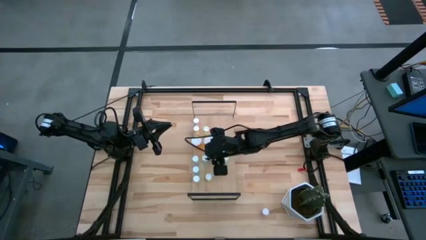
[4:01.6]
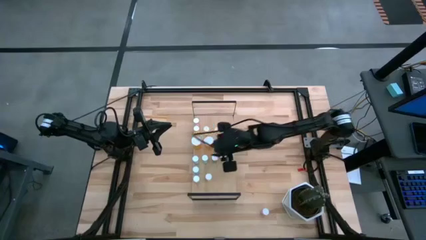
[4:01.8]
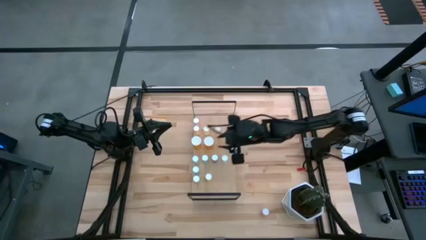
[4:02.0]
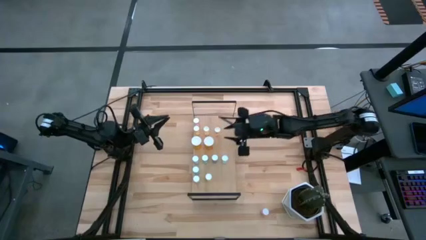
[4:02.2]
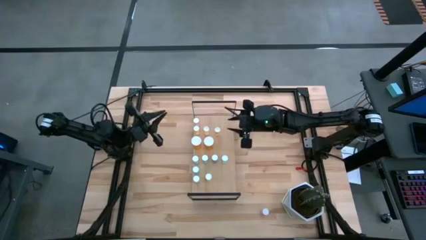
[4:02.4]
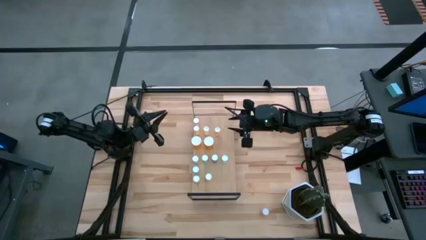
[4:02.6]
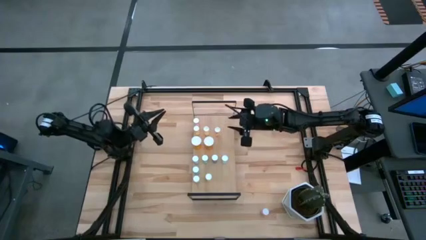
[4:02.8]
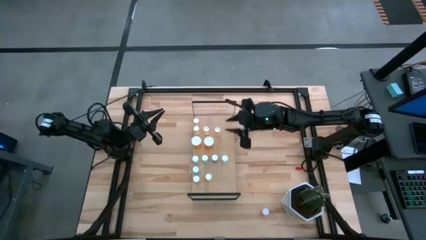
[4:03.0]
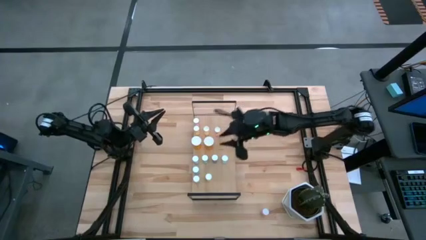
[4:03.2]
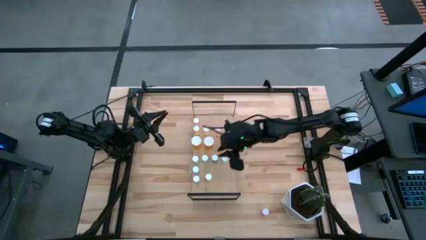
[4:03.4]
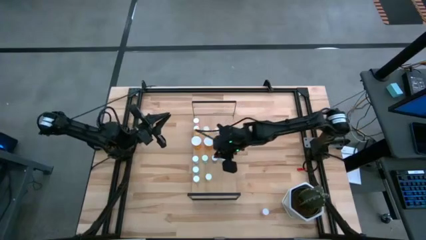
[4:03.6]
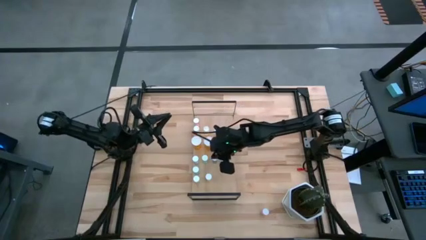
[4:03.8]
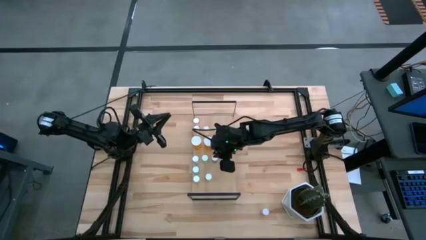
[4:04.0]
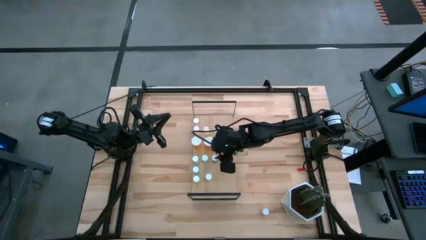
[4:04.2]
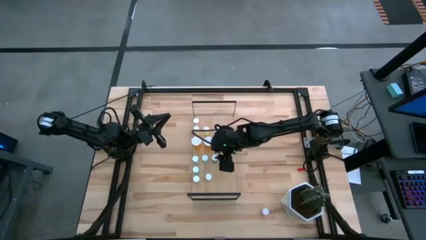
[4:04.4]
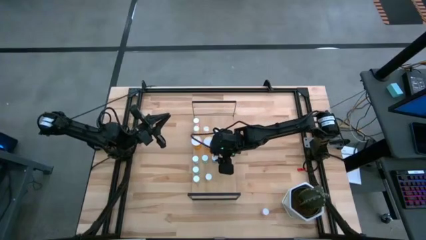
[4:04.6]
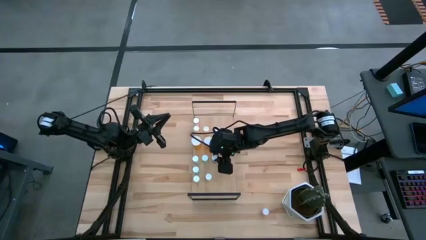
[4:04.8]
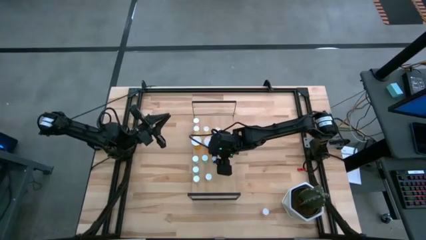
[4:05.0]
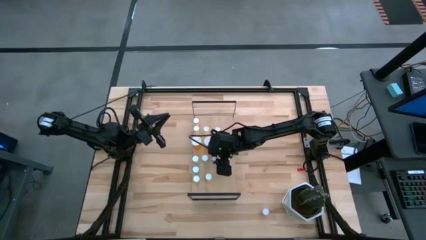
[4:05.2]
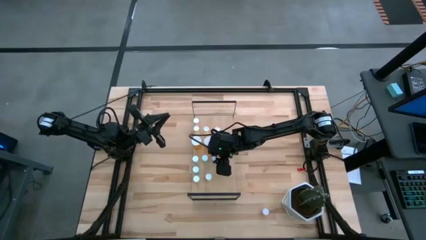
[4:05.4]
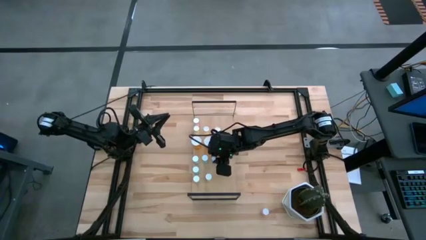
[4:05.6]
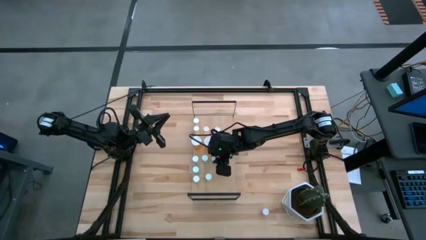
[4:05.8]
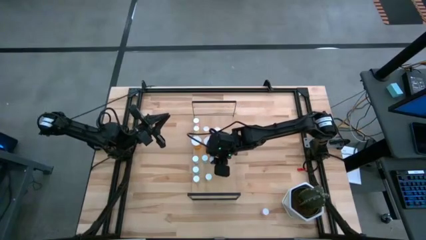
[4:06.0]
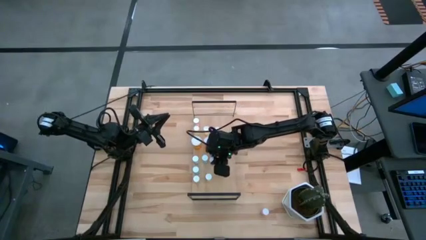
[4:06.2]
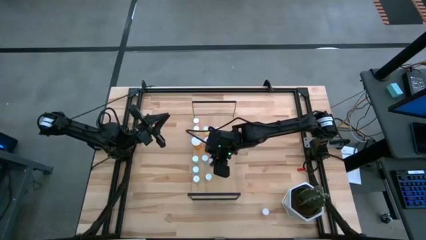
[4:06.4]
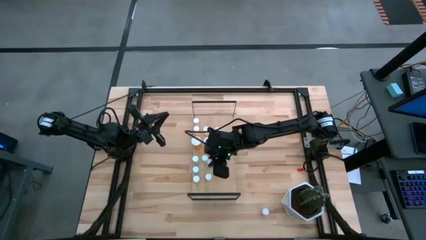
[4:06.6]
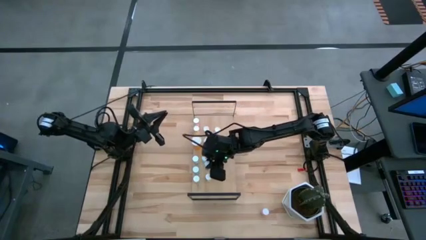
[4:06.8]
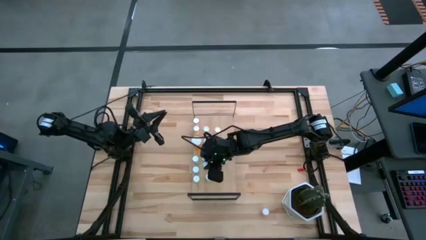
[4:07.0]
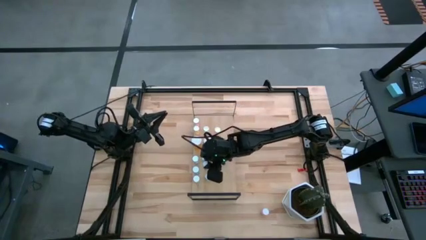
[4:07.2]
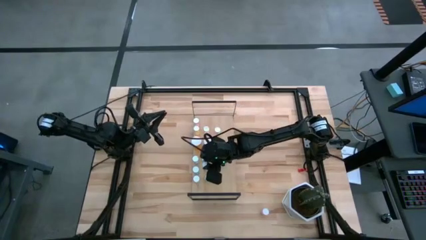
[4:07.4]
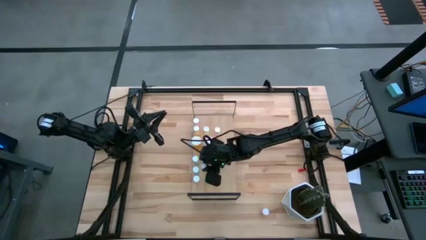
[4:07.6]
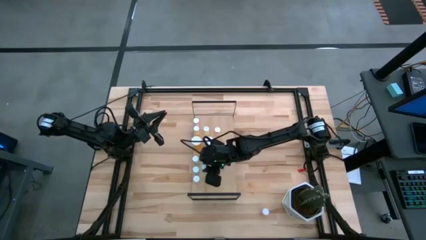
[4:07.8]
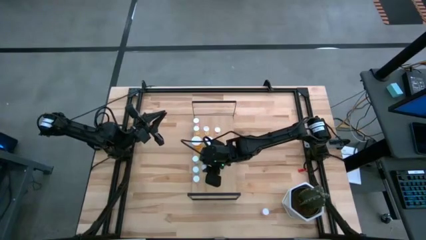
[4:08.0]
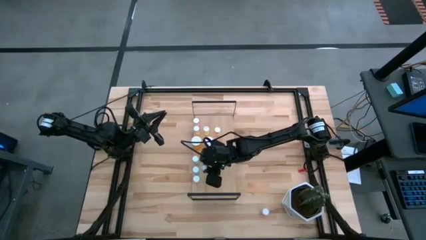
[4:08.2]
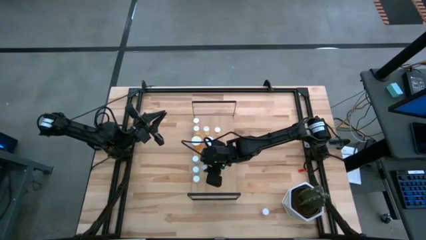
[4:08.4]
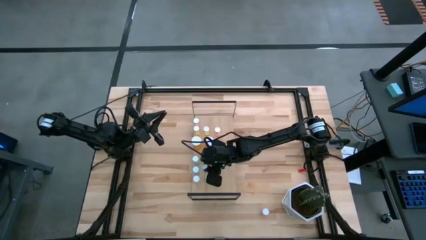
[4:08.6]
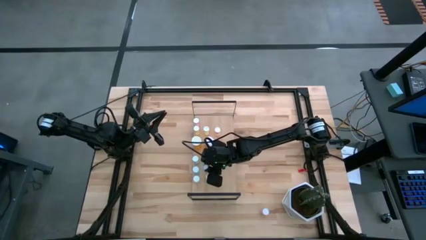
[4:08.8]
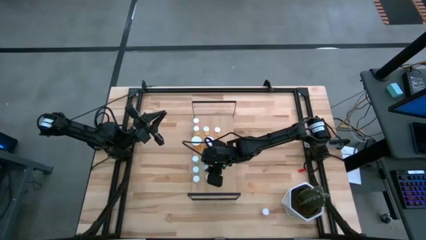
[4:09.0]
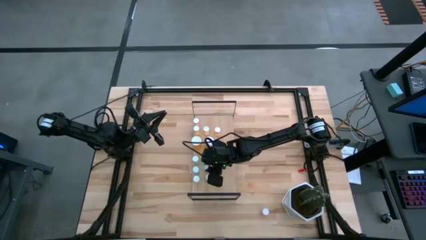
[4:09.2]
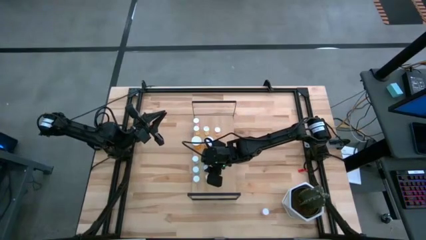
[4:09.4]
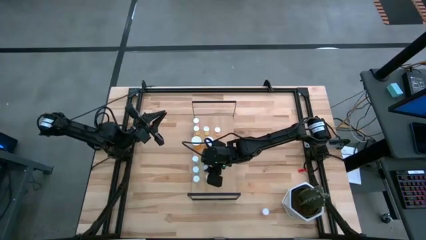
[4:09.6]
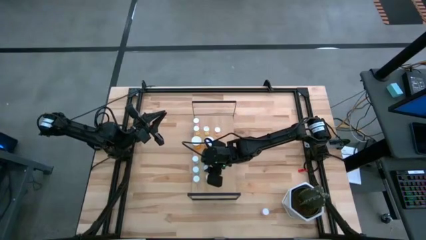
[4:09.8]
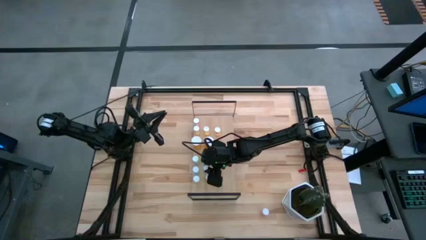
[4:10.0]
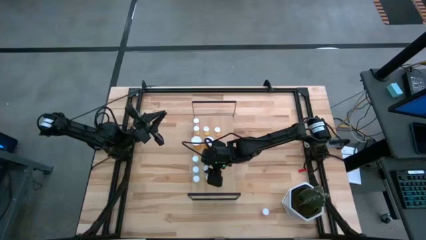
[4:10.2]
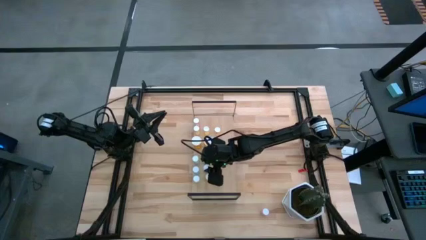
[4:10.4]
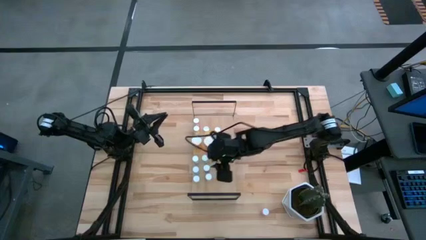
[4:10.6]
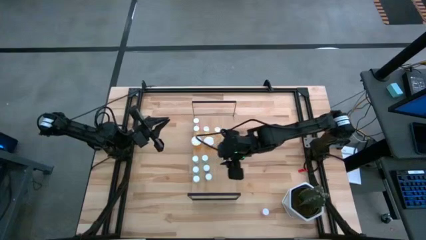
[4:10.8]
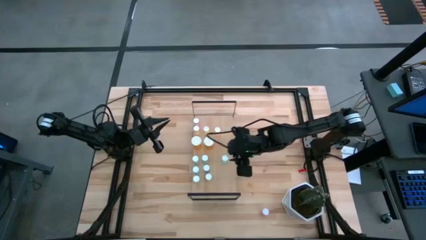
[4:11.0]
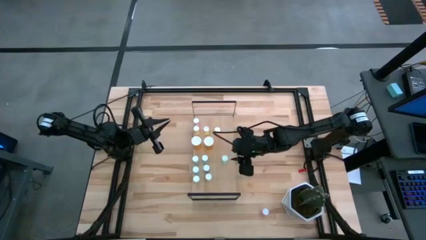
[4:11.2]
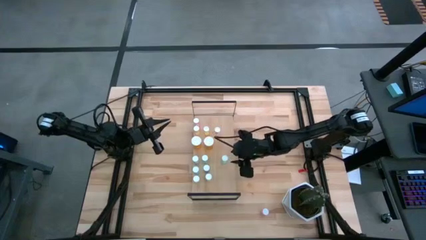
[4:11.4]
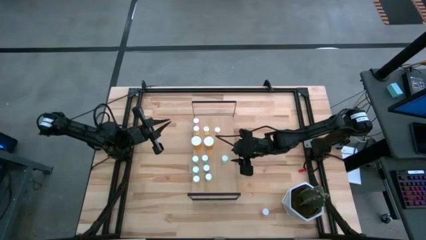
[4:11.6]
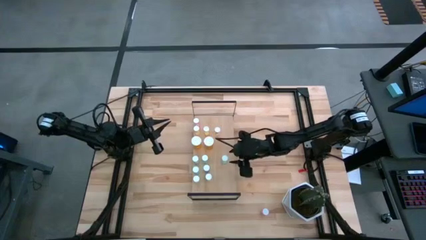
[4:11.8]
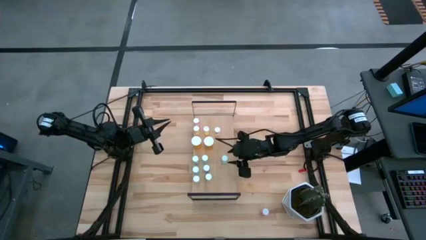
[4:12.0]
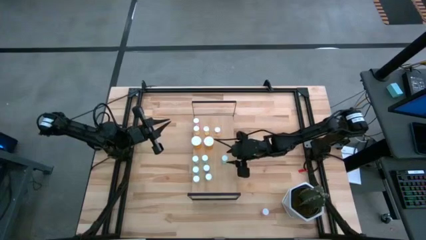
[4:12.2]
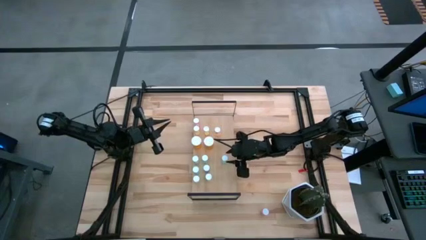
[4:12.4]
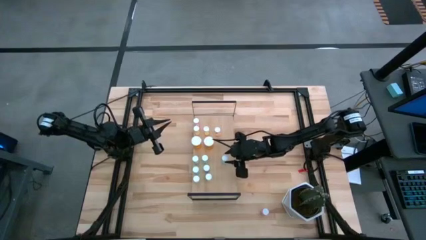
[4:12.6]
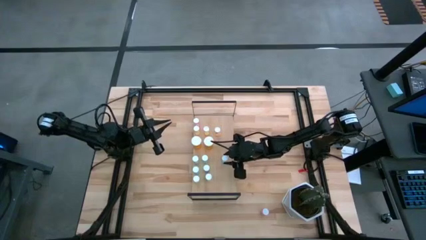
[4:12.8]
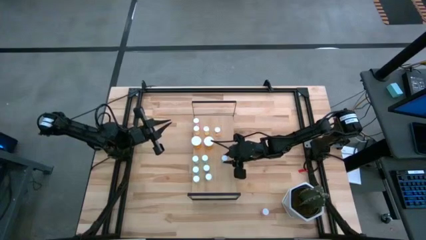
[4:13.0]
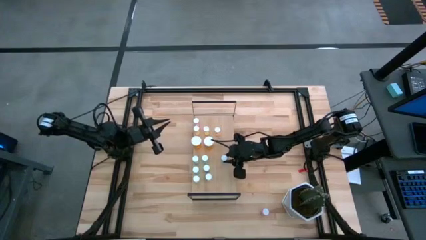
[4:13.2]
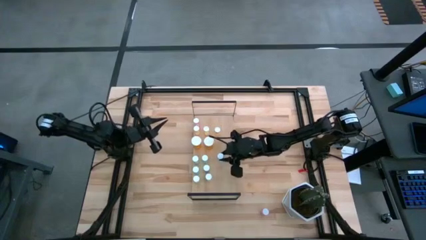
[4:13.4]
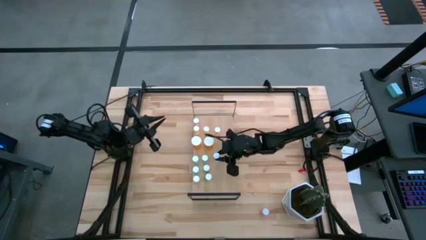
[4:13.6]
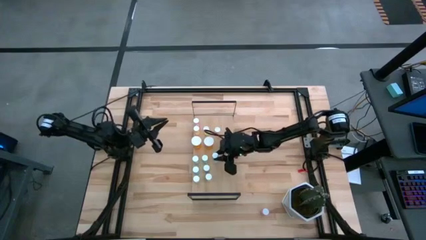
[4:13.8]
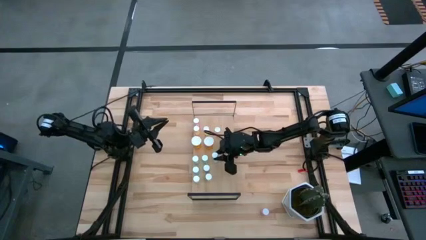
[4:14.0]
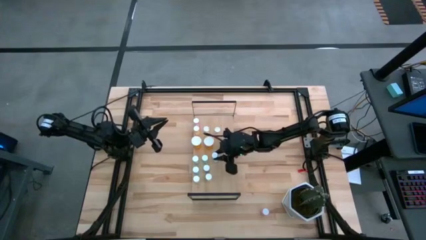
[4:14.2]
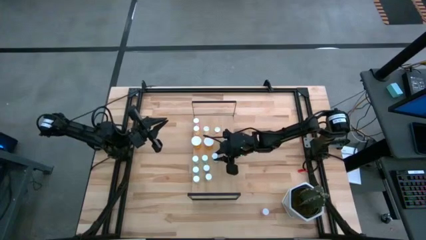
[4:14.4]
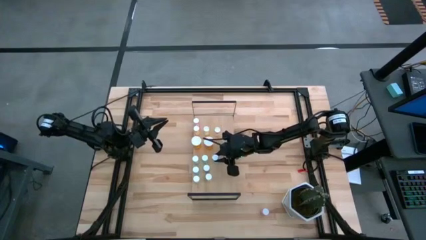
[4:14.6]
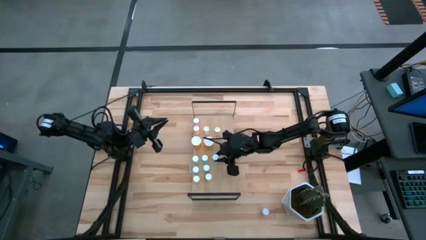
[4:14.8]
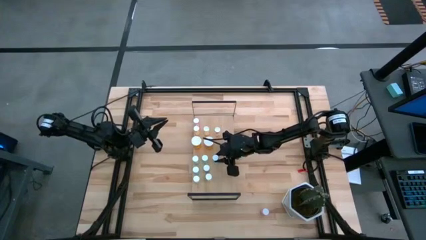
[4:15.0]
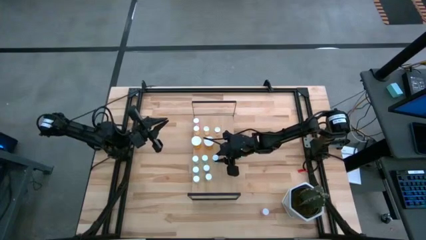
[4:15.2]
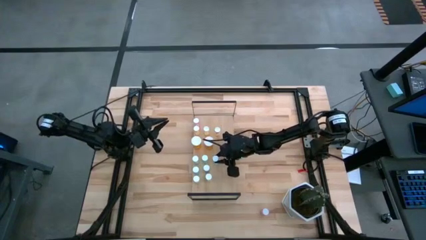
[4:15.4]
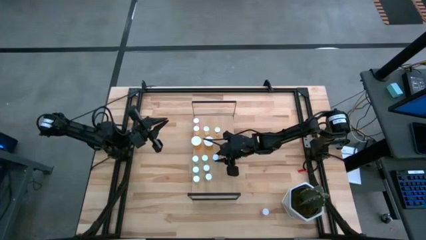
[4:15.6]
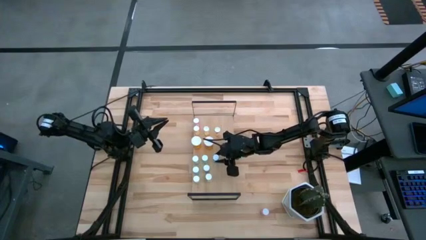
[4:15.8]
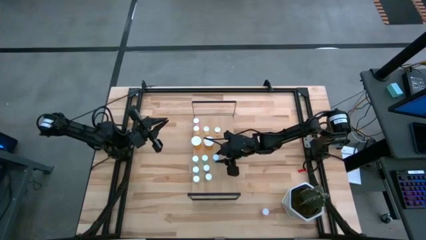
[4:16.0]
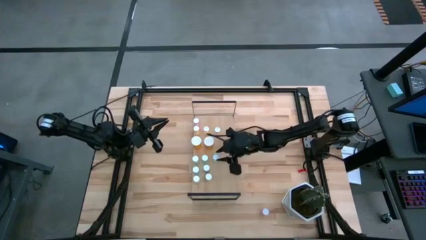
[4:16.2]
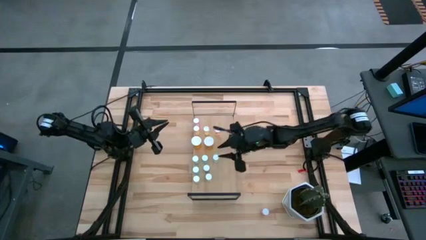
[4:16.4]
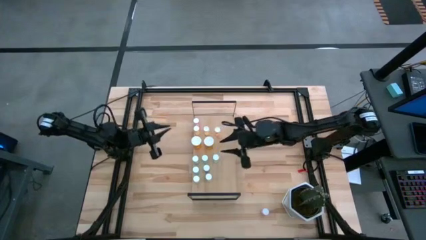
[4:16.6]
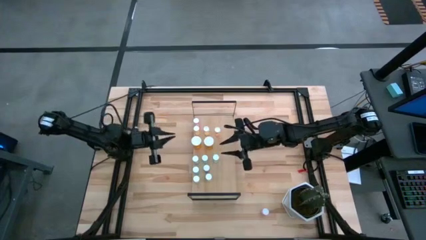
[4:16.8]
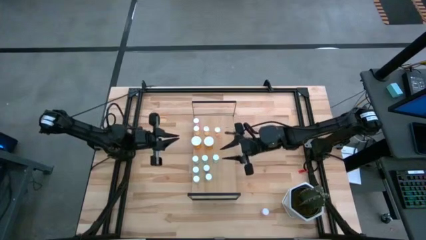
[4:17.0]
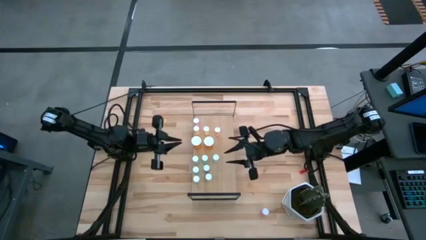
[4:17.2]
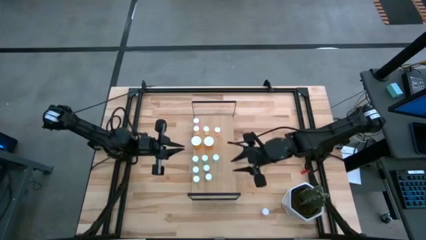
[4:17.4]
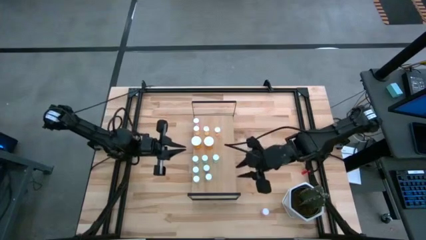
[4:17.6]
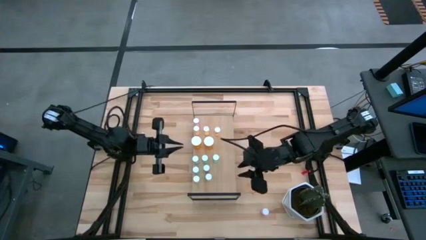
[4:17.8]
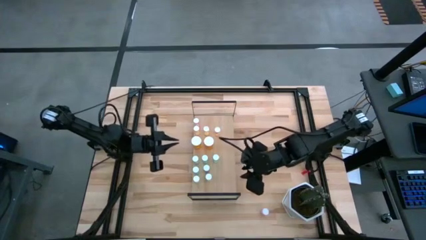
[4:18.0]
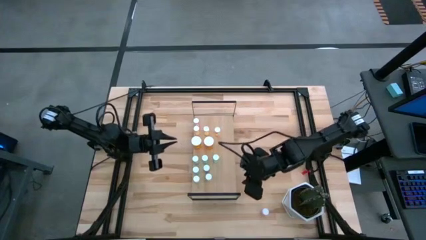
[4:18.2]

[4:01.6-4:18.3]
Task: Pick and place medicine bottles onto shelf by color
Adjust the pill bottles on the shelf

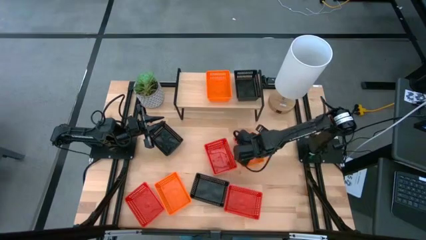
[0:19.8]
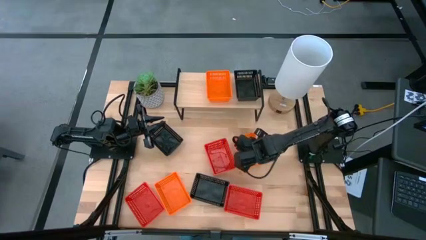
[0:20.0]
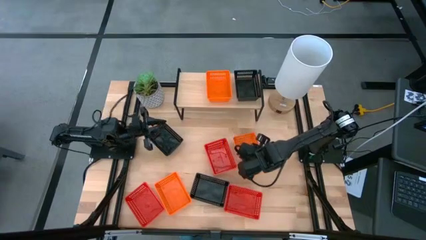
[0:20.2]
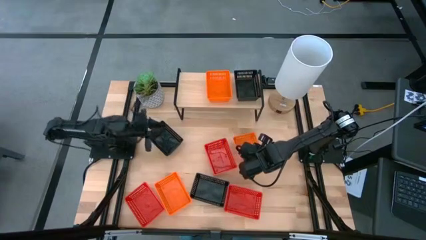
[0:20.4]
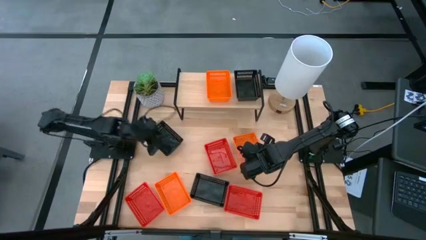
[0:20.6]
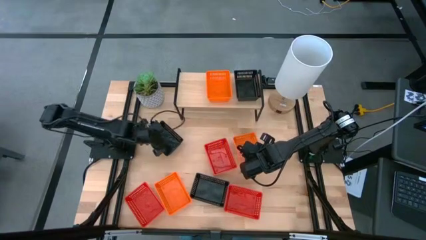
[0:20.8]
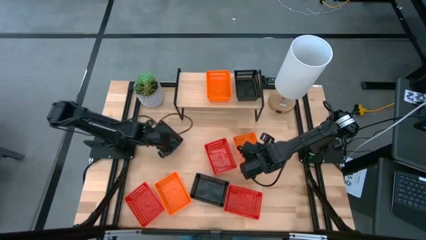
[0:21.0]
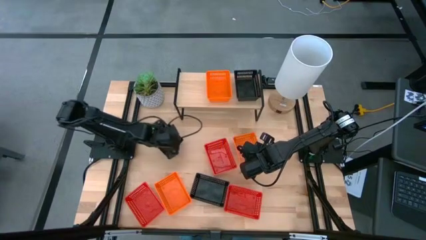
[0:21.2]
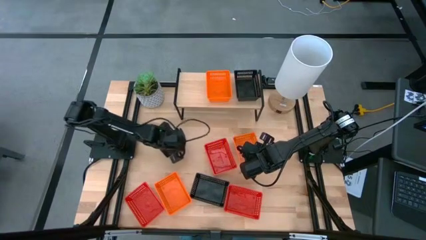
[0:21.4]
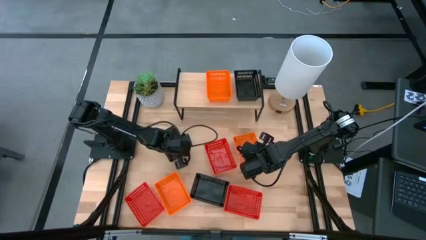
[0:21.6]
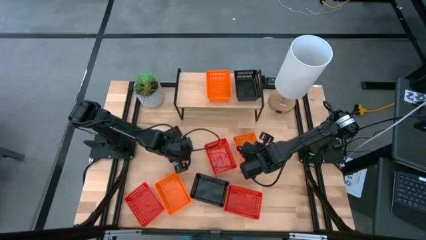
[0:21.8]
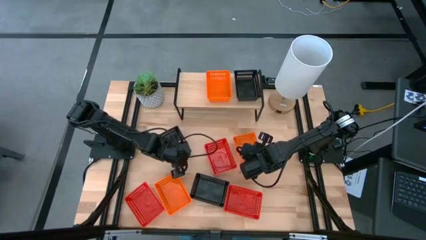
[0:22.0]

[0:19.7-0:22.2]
Task: Stack baskets on shelf by color
Adjust the left black basket
